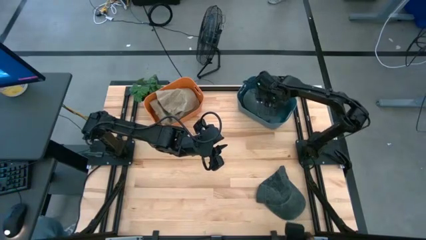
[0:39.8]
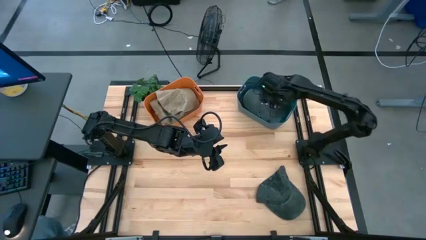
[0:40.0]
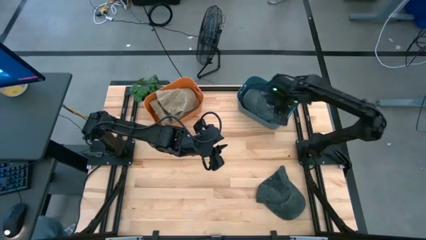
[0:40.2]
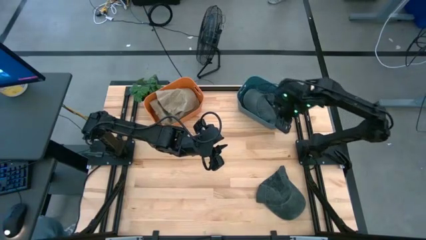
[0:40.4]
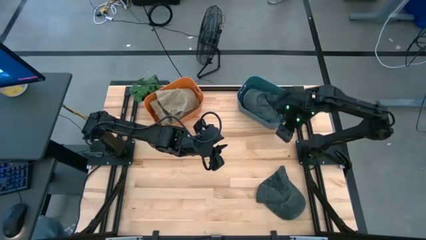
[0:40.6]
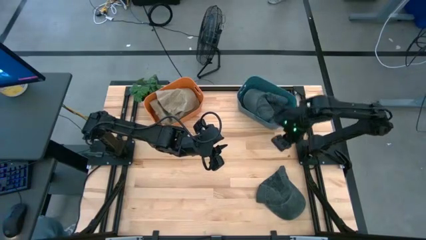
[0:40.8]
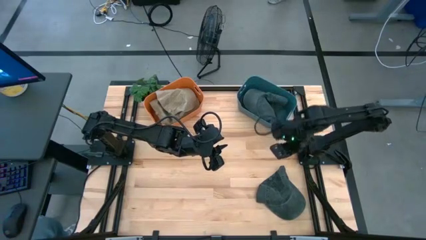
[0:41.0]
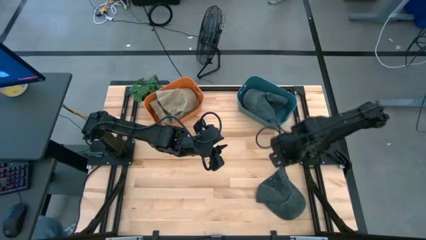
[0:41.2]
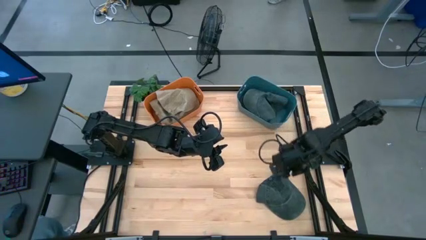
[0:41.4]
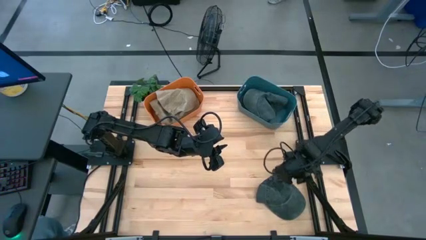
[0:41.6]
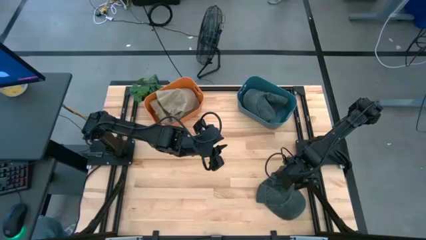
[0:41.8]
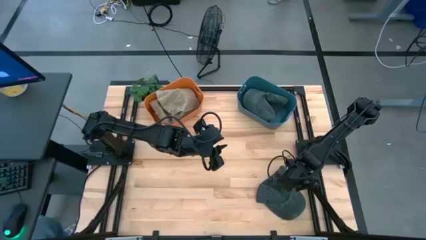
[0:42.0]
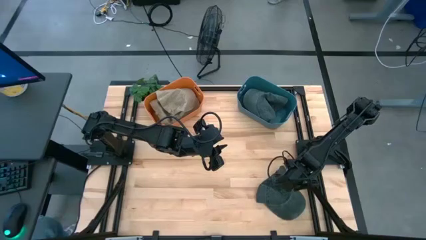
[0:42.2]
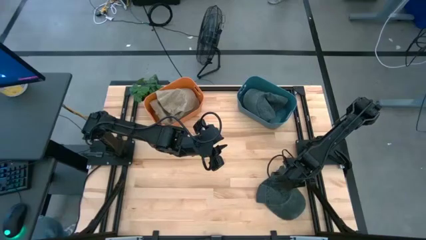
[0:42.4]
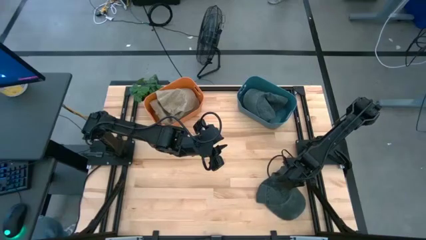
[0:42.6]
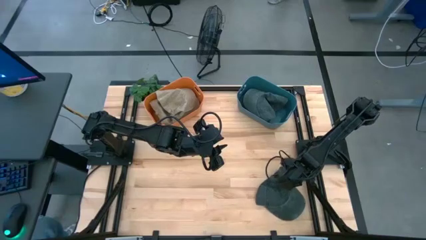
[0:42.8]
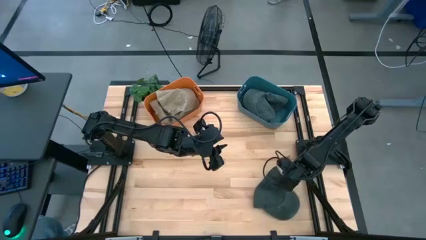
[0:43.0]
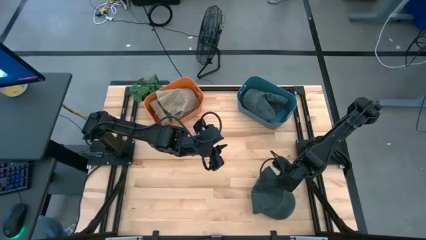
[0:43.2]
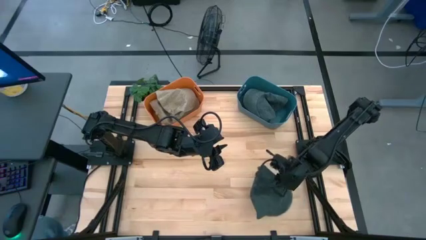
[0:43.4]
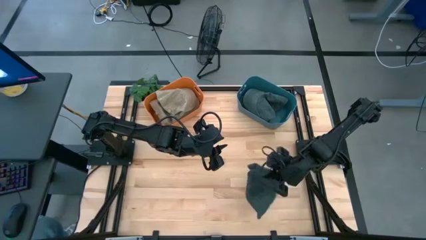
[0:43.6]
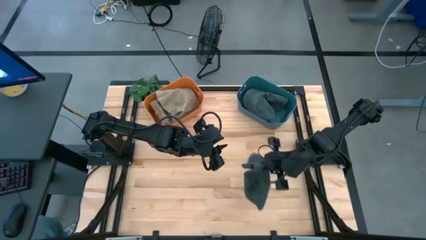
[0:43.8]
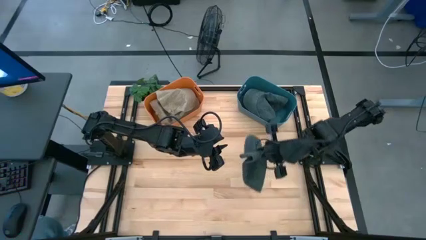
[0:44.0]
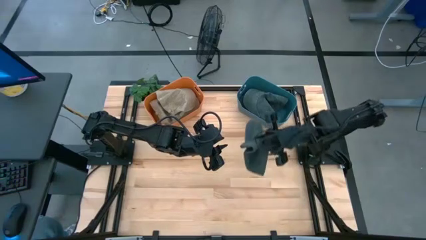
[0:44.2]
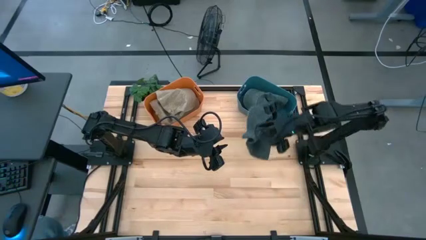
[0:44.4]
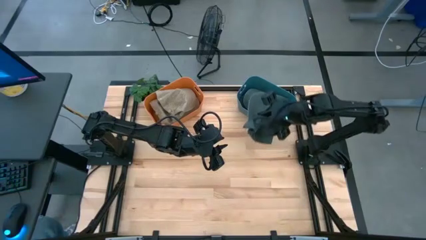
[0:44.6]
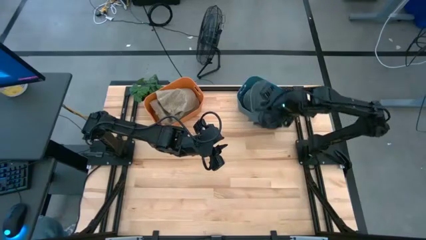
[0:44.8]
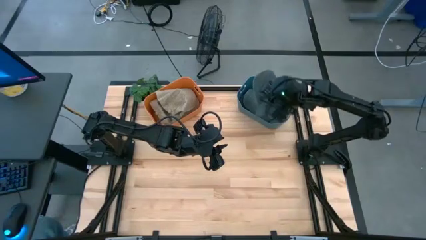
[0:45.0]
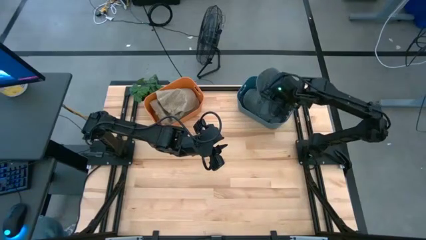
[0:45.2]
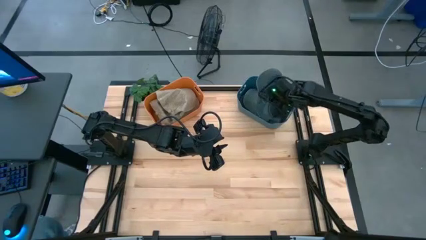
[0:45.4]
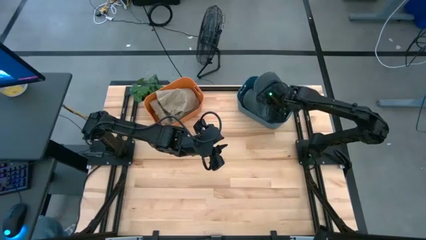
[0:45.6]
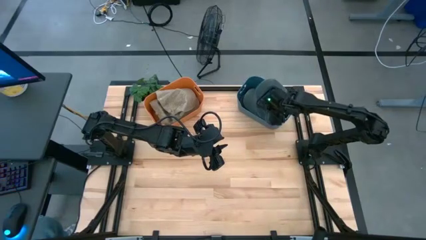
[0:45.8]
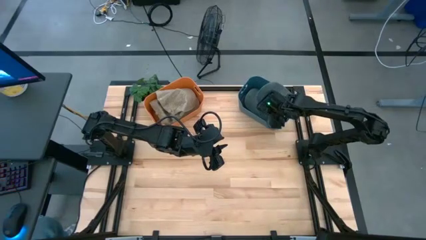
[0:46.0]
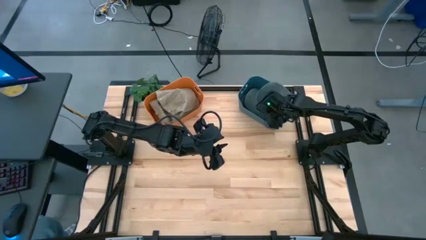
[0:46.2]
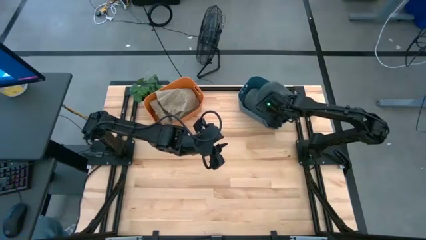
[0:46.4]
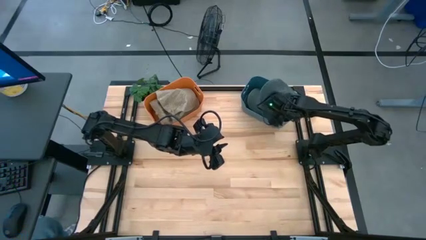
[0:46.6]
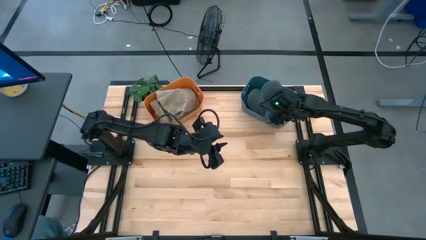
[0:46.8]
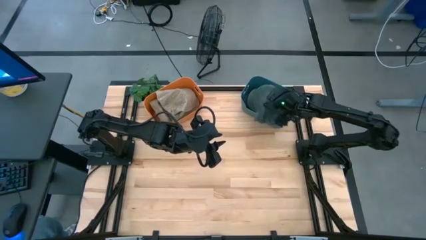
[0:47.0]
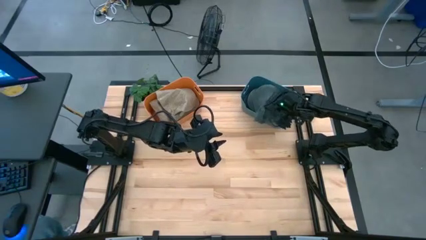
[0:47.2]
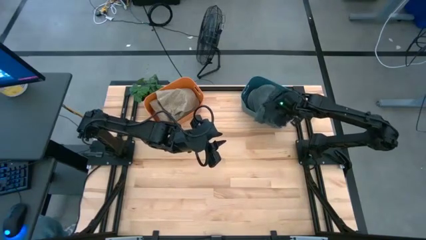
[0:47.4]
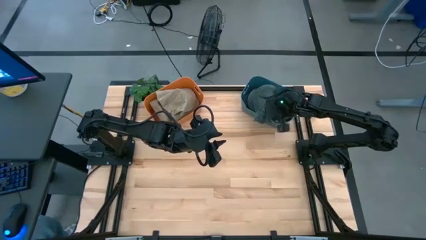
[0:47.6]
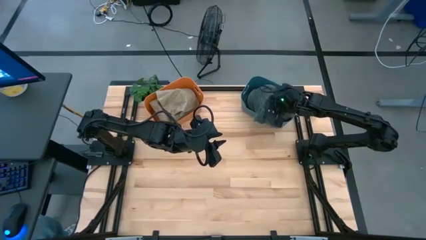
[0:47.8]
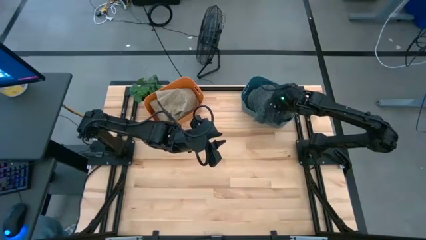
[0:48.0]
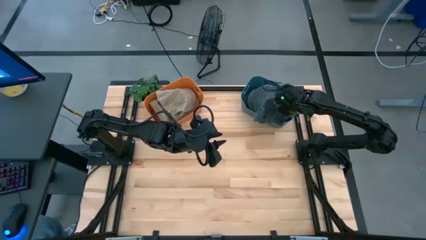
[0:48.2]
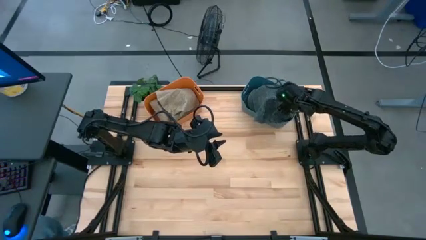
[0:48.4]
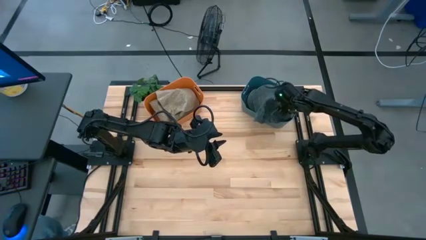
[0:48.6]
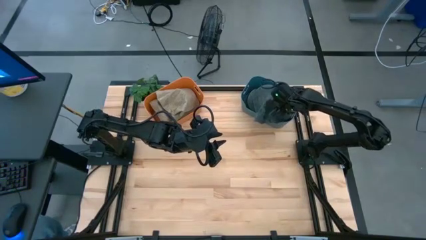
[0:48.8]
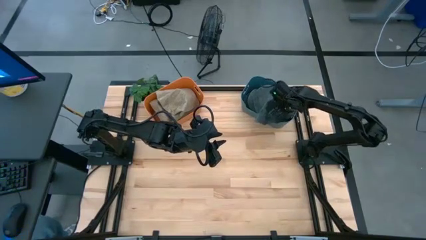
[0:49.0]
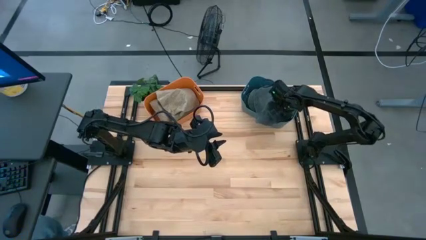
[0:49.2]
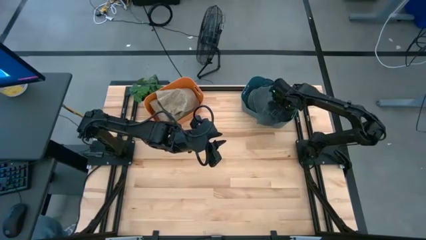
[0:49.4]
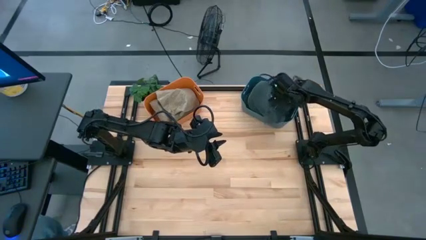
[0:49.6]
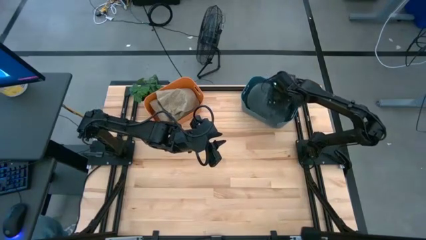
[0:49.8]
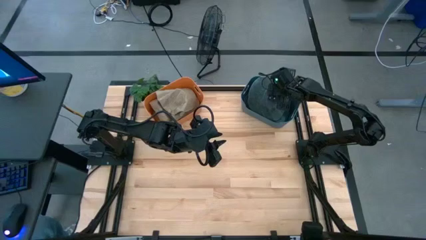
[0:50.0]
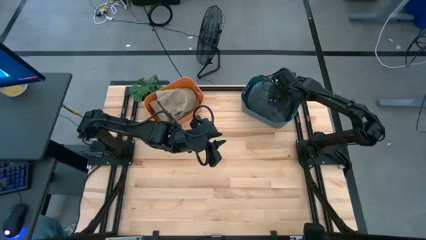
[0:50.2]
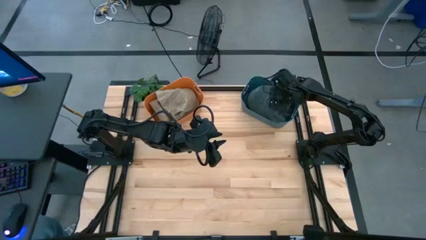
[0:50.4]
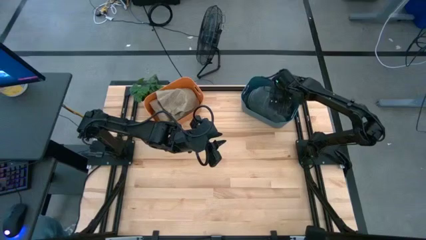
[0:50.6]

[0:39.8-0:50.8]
Task: Pick & Place hat
Put the black cap into the dark blue bin

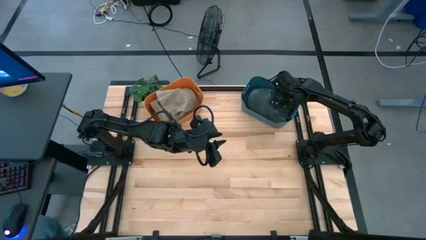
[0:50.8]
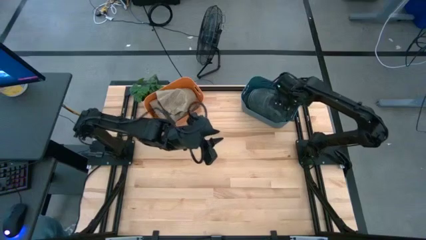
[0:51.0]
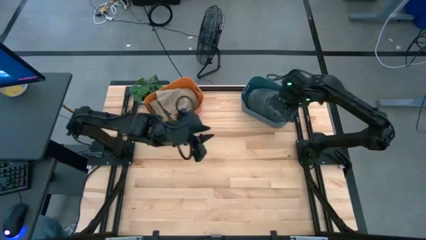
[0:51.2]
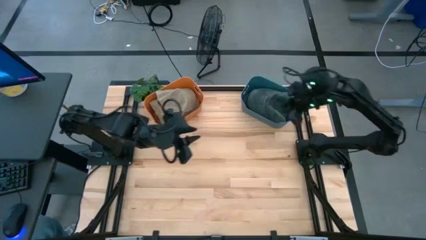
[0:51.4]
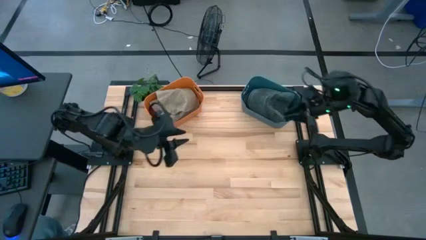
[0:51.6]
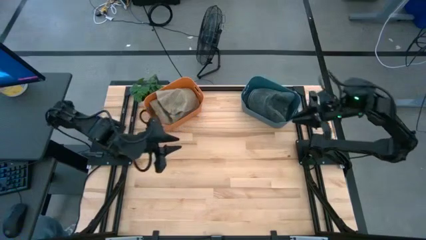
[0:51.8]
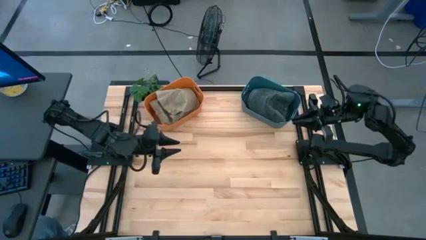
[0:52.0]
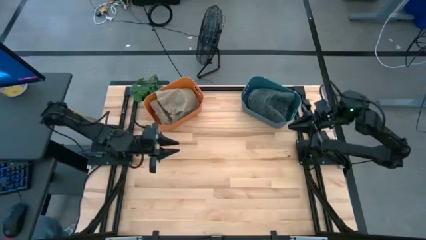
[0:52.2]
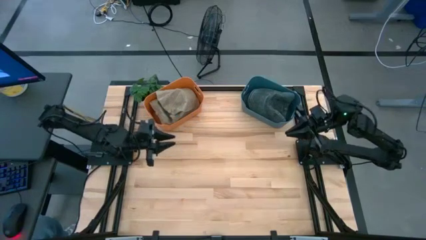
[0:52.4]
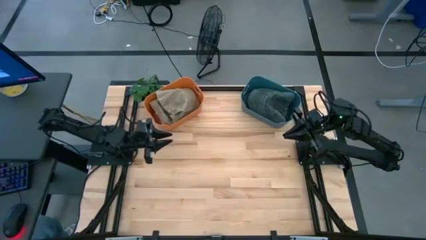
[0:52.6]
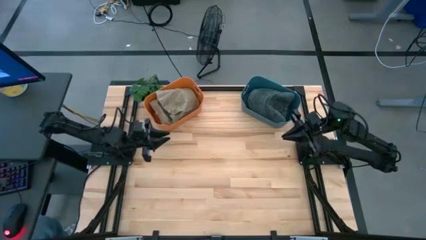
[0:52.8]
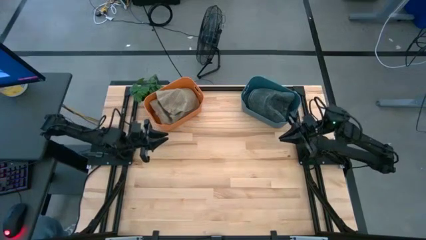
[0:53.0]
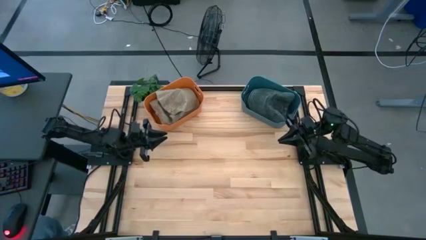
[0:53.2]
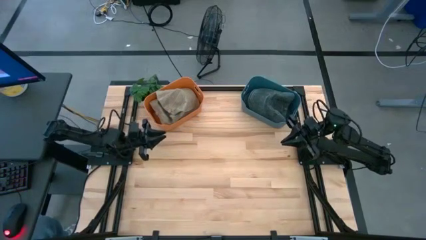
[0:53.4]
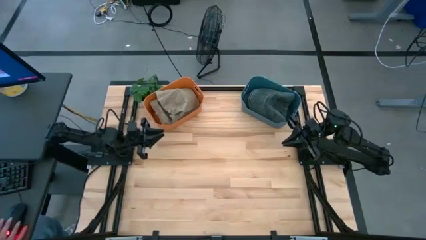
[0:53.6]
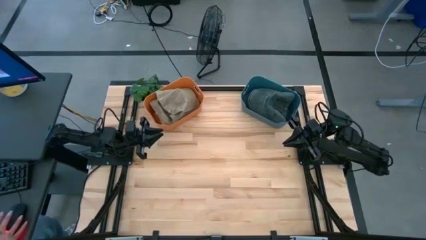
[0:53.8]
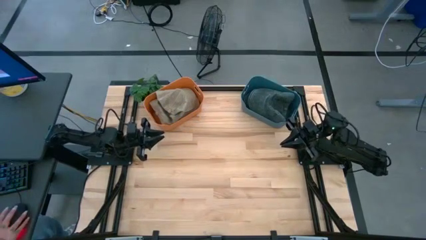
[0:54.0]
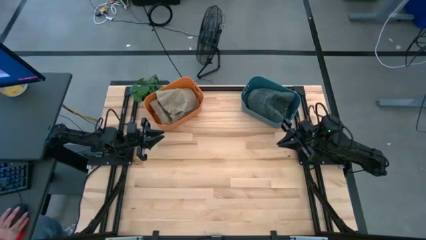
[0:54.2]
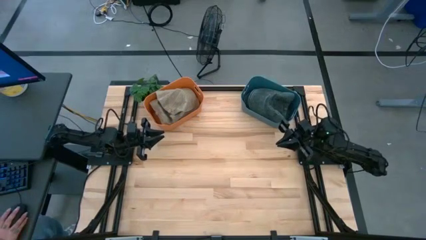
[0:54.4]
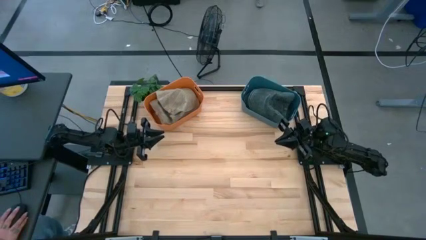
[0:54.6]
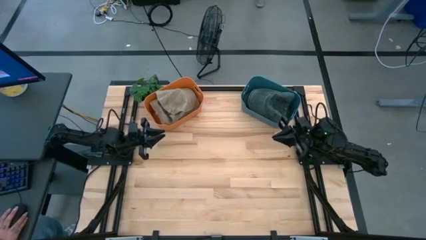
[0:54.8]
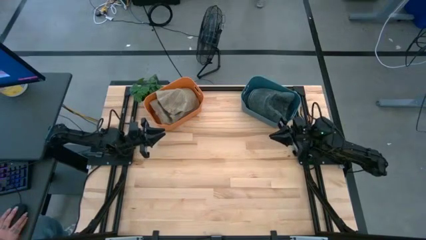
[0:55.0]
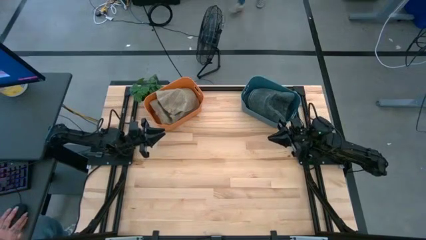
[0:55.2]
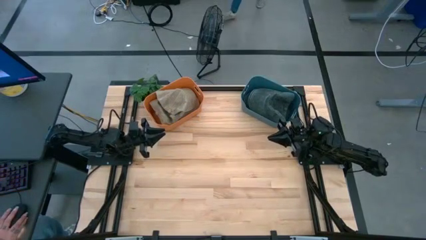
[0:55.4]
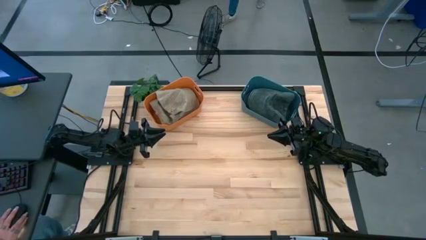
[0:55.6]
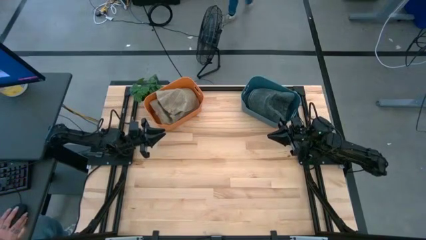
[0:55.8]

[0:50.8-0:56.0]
Return to Home Position

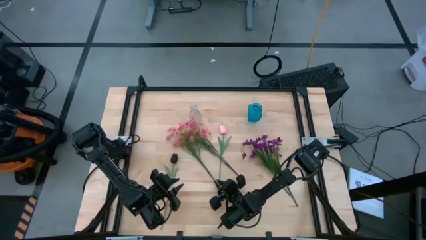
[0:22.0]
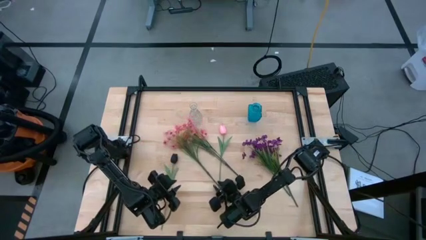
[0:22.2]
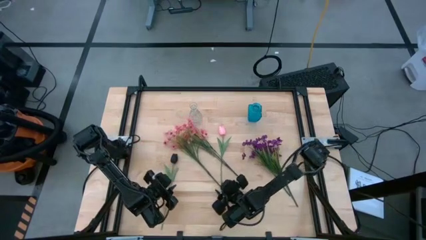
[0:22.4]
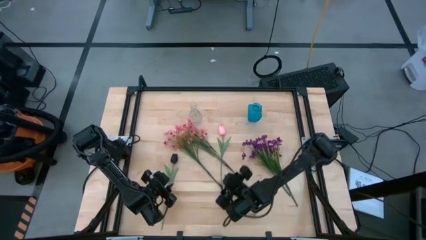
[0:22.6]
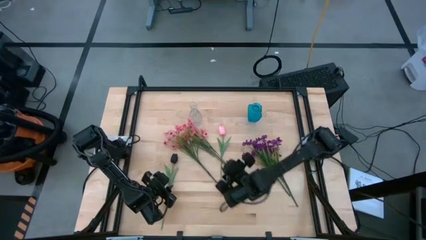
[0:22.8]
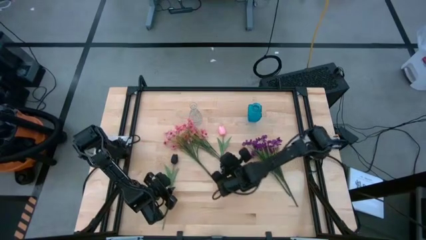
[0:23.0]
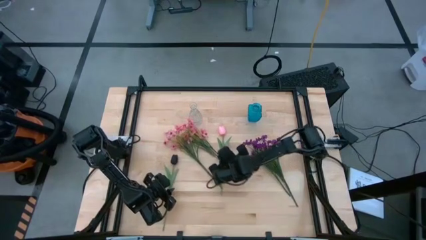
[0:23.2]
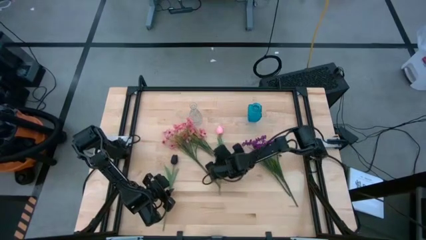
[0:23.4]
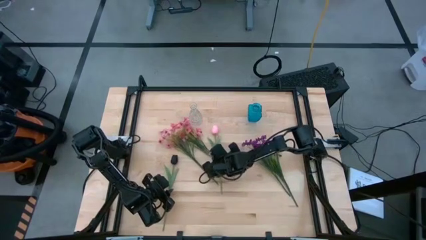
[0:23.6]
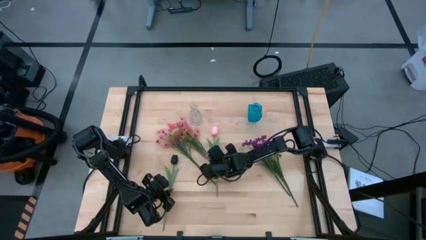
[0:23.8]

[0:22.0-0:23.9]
Task: Sort flowers into vase by color
Adjust the pink flowers
